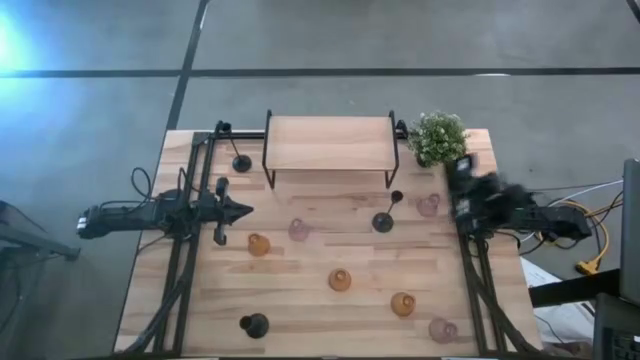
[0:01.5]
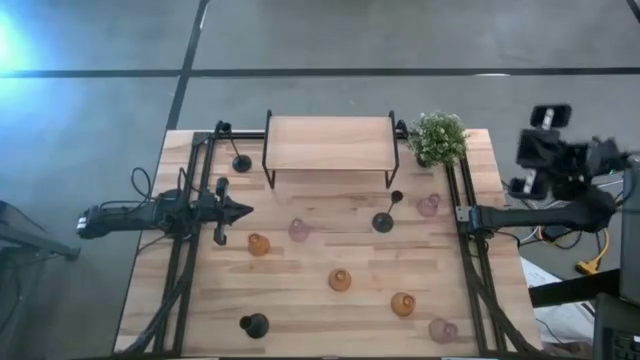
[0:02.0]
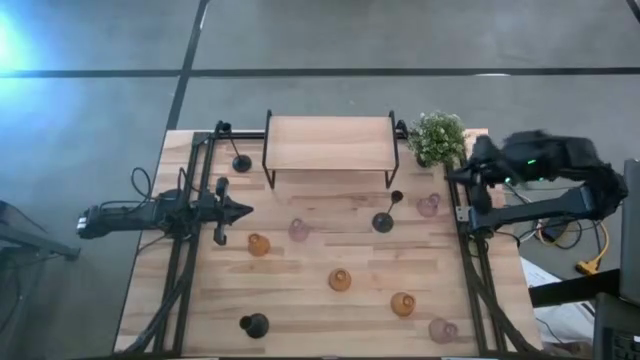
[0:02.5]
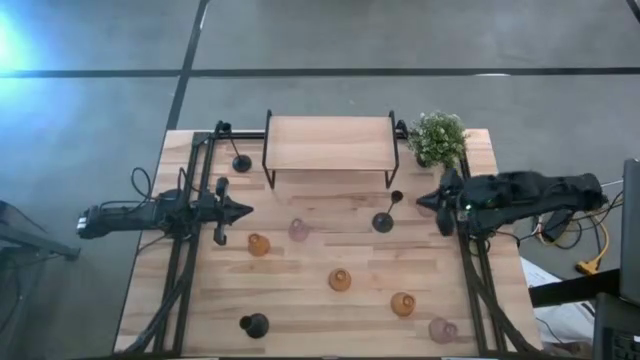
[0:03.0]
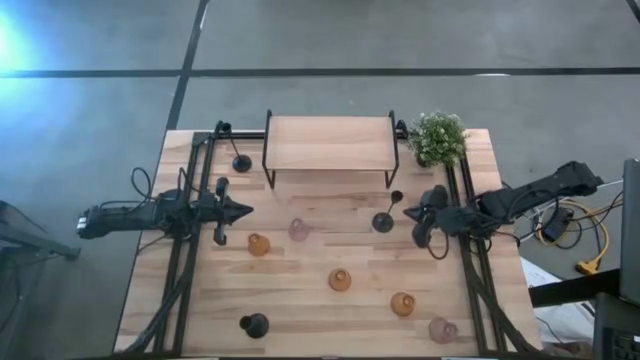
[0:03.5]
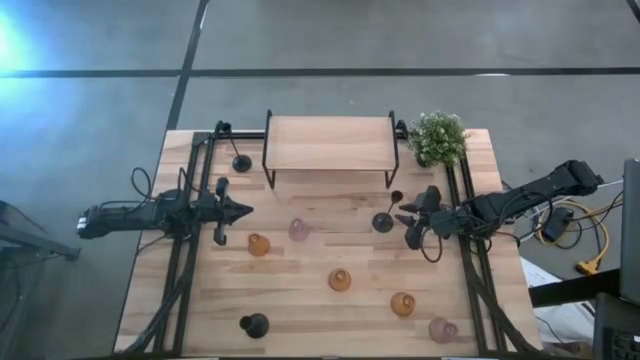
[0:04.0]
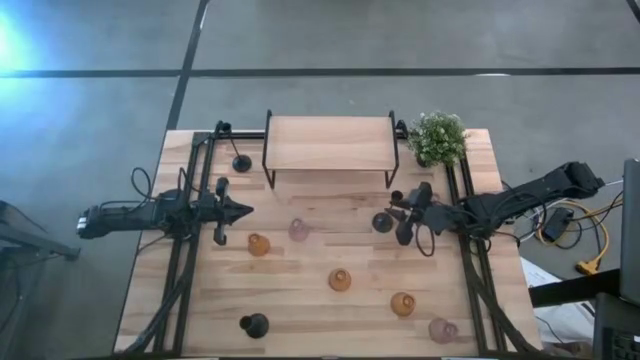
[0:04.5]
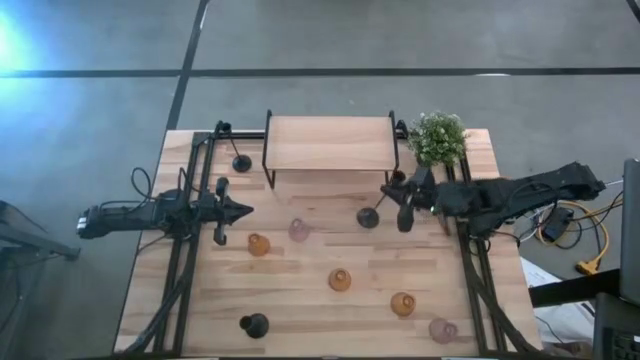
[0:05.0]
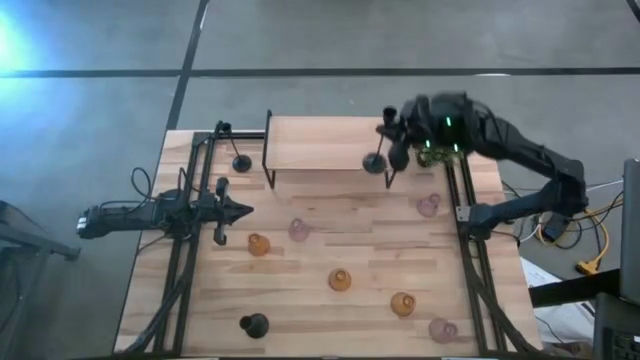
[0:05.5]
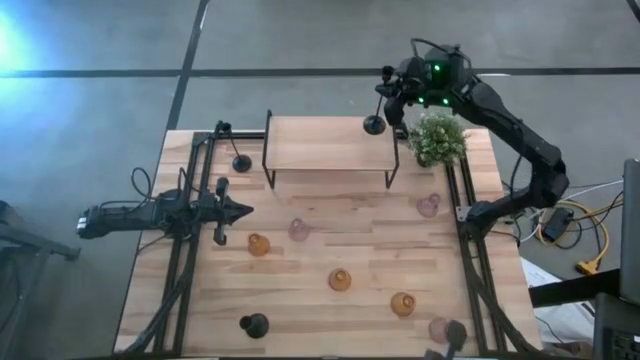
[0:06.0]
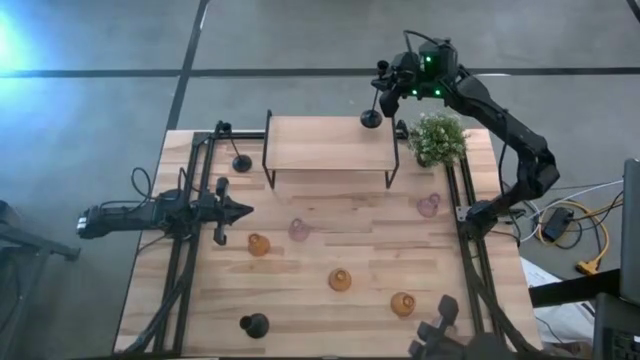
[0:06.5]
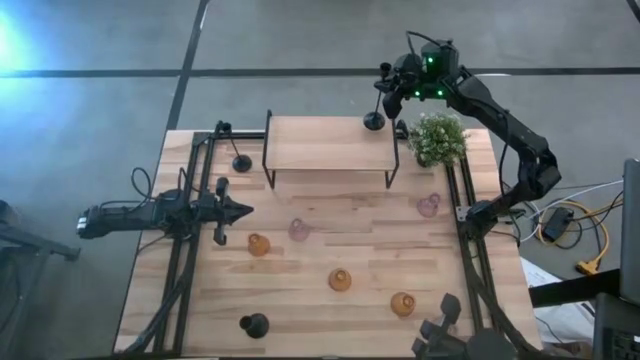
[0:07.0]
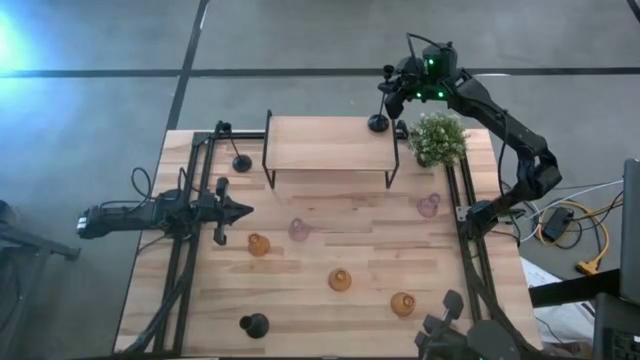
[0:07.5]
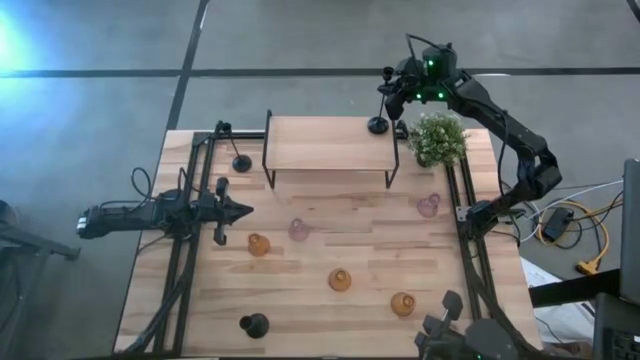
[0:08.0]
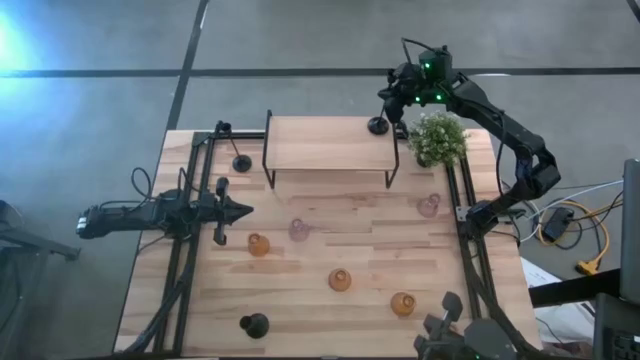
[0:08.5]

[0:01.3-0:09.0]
Task: Pick & Place candle stick holders
Put the top right black candle holder on the shelf

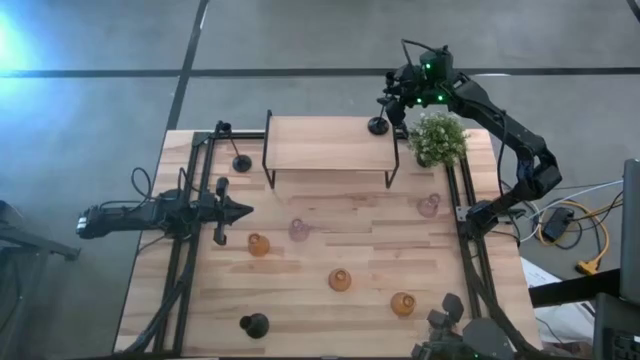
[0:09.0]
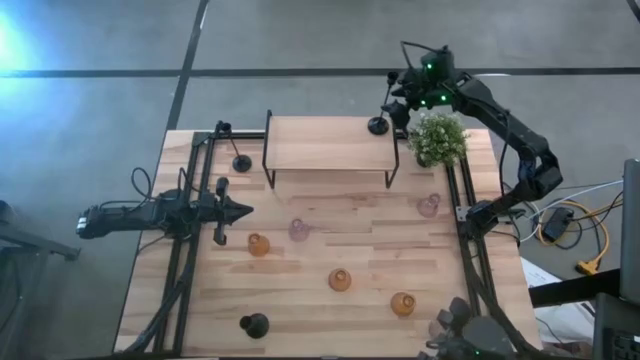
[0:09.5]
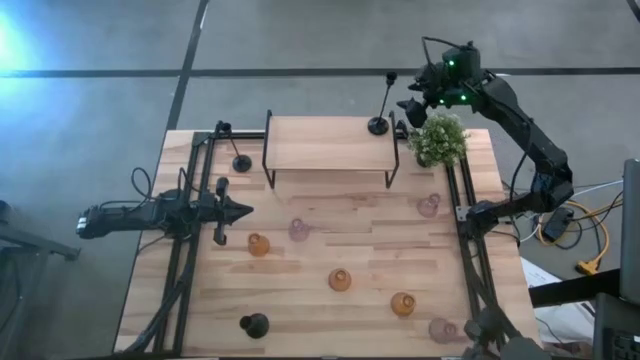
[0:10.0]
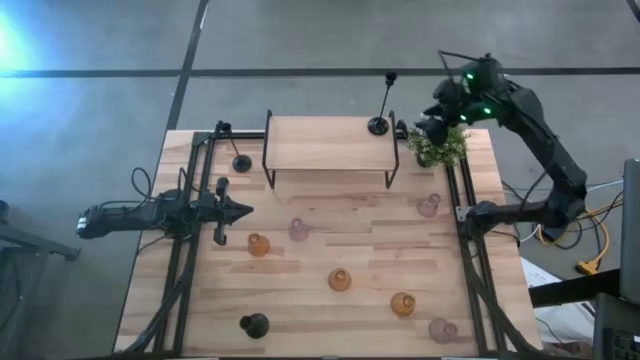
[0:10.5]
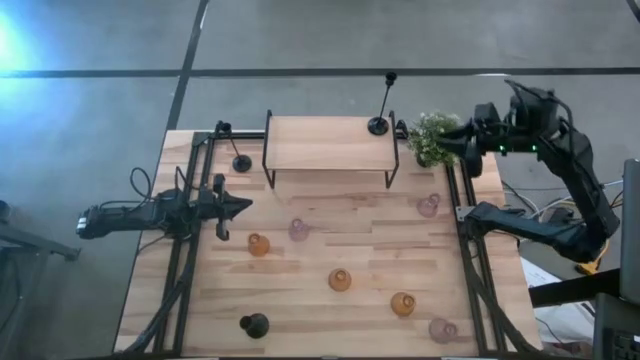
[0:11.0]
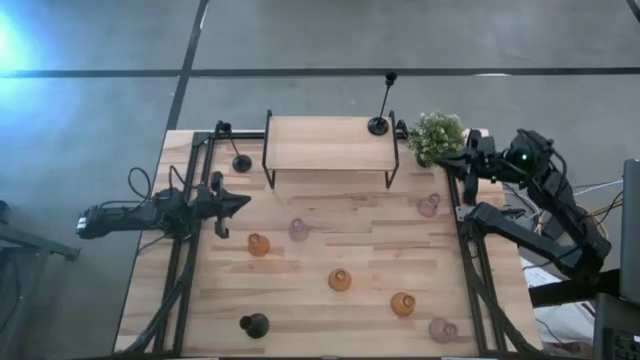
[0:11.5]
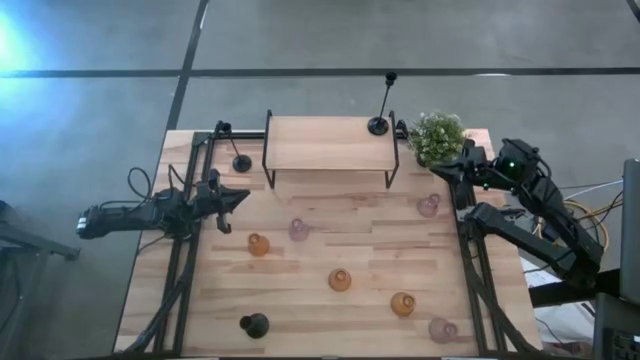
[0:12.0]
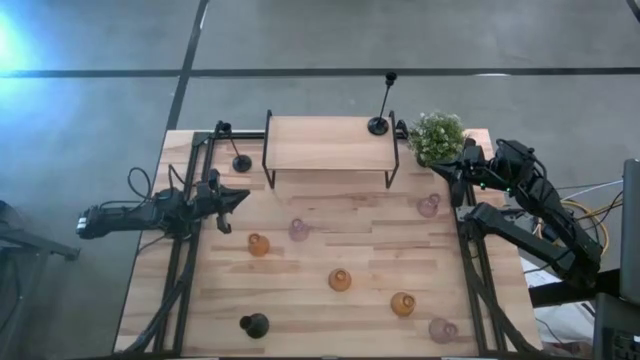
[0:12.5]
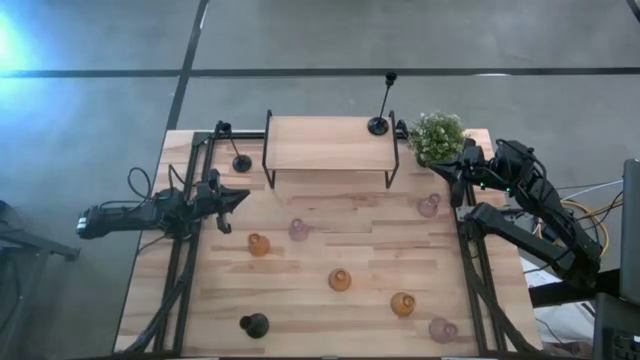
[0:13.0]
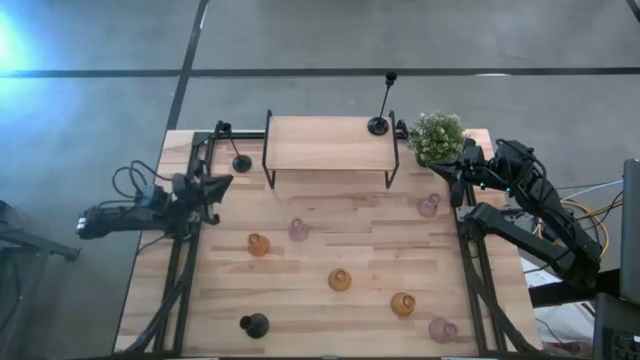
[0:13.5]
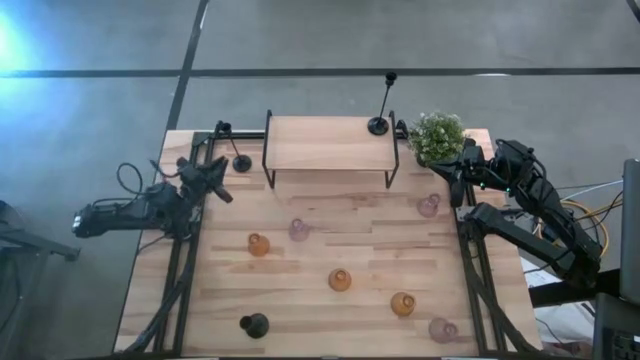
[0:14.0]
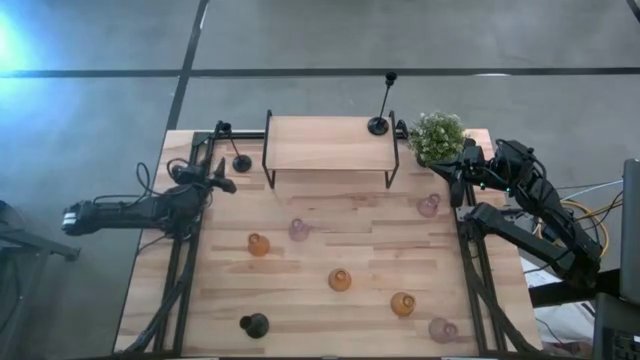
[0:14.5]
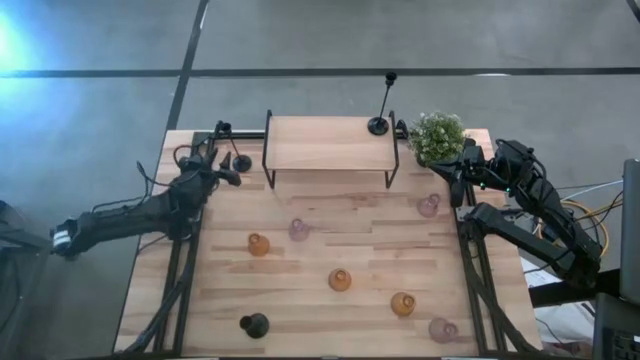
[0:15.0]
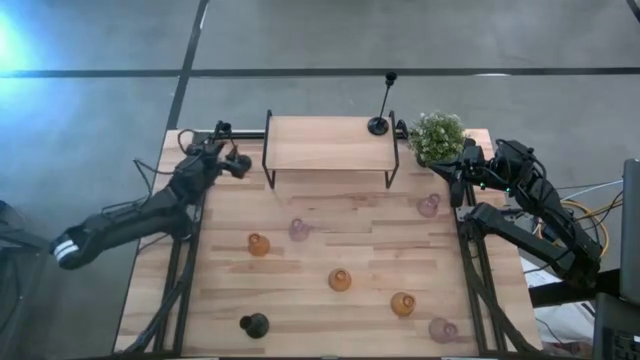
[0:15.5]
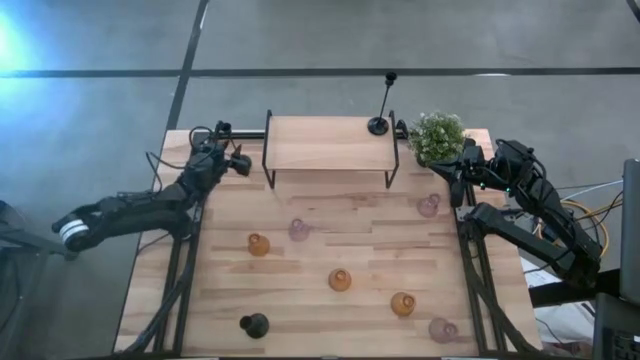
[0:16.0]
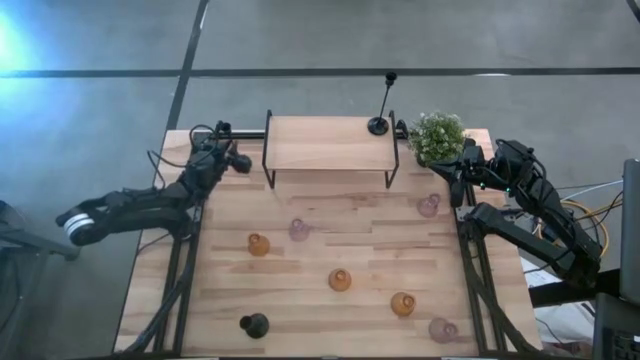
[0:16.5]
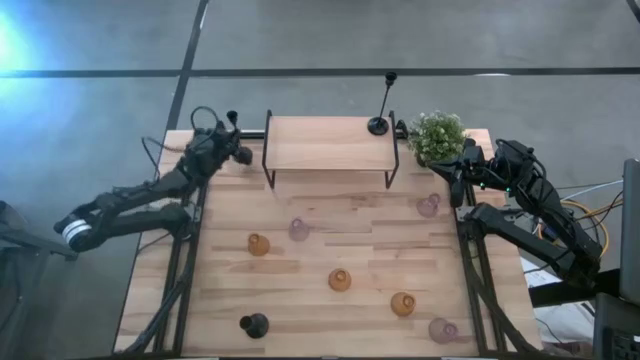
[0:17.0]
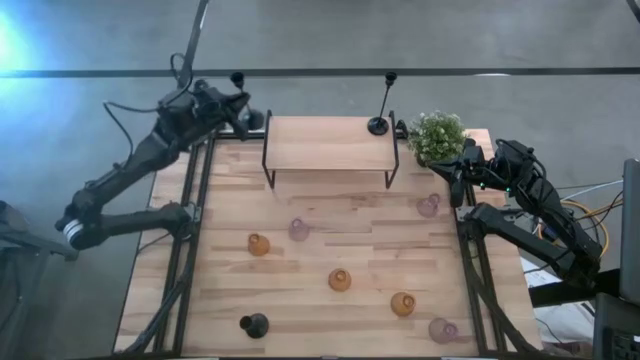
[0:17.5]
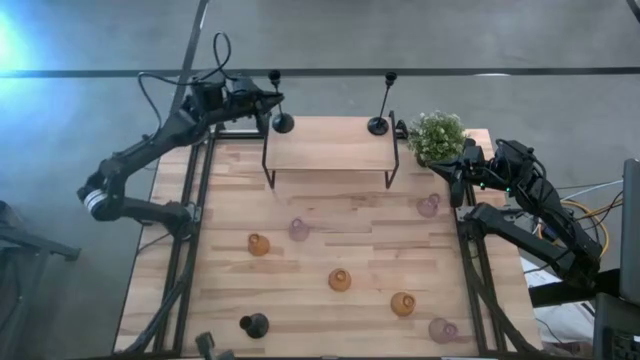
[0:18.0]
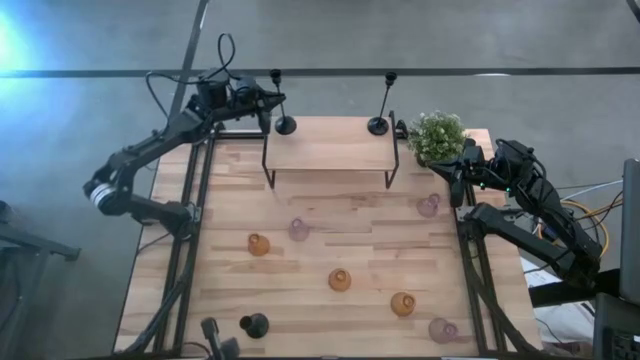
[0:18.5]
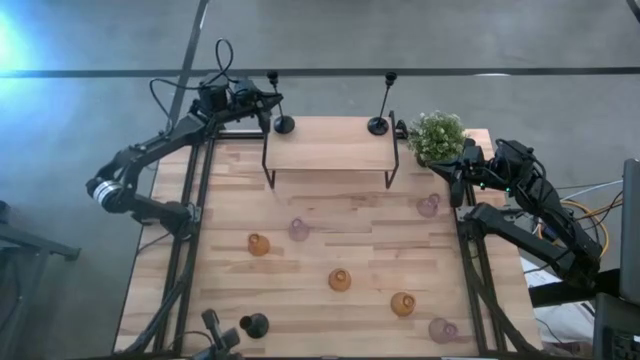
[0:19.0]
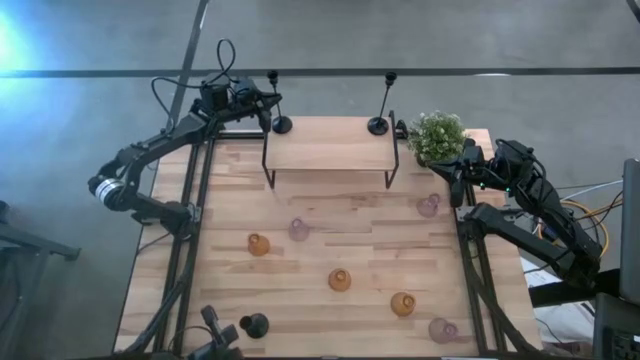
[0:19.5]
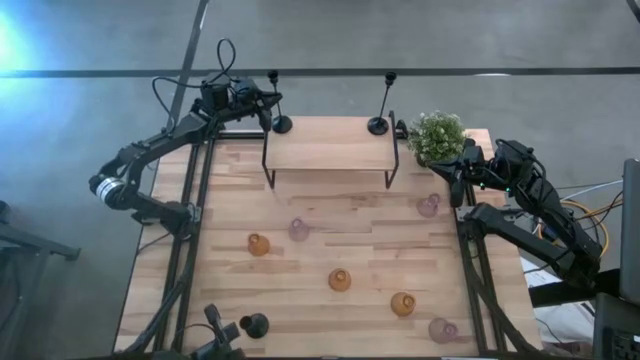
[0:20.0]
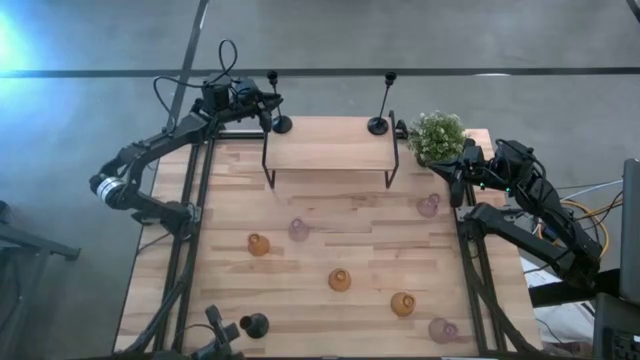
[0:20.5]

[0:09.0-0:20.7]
Put the top black candle holder on the shelf

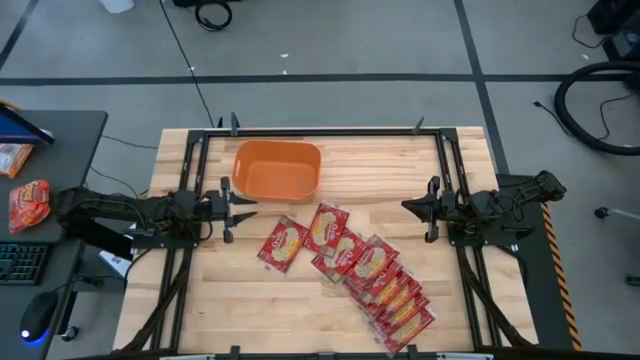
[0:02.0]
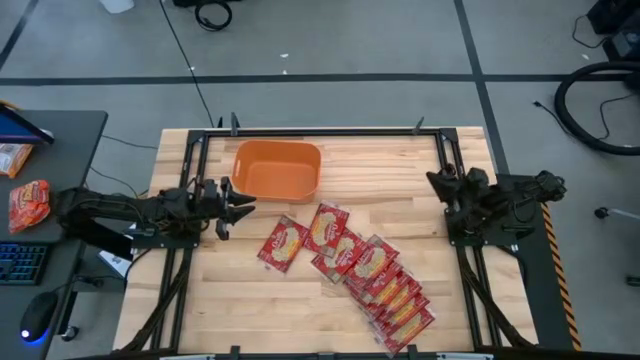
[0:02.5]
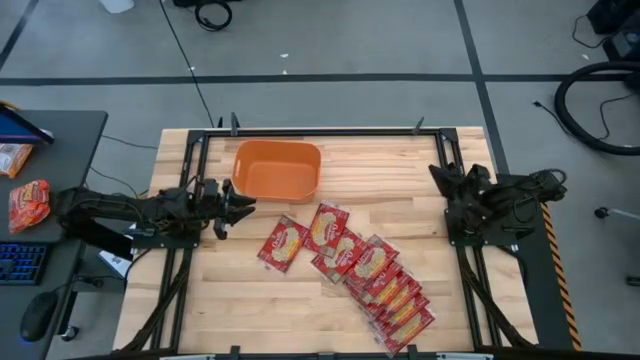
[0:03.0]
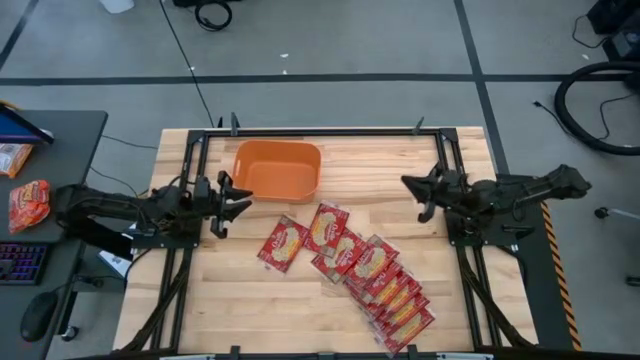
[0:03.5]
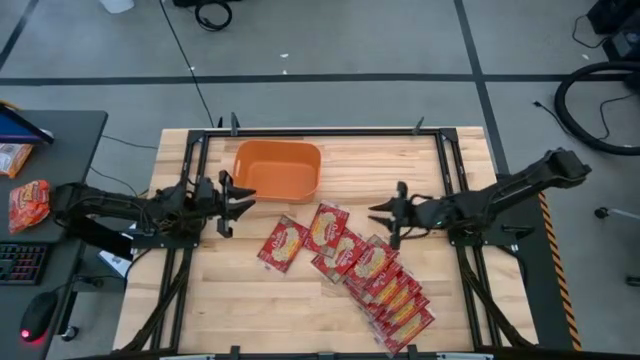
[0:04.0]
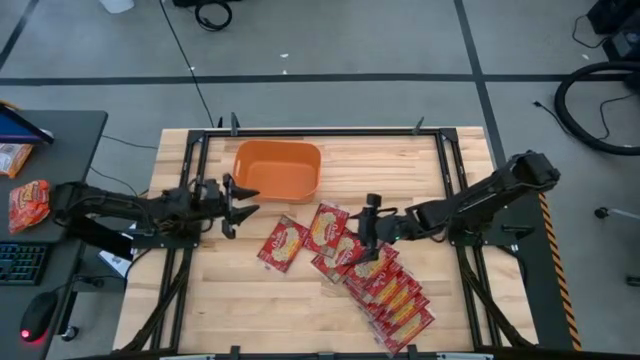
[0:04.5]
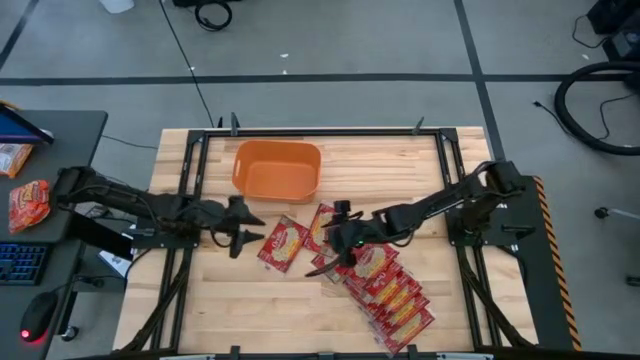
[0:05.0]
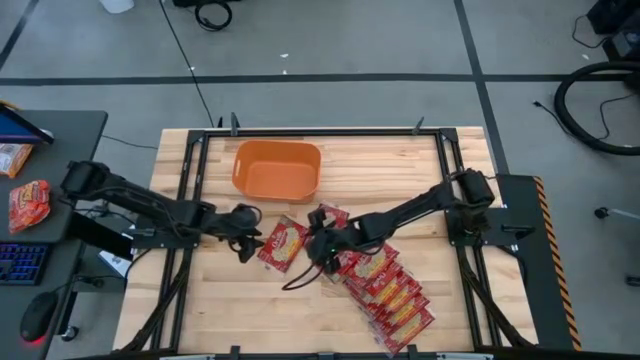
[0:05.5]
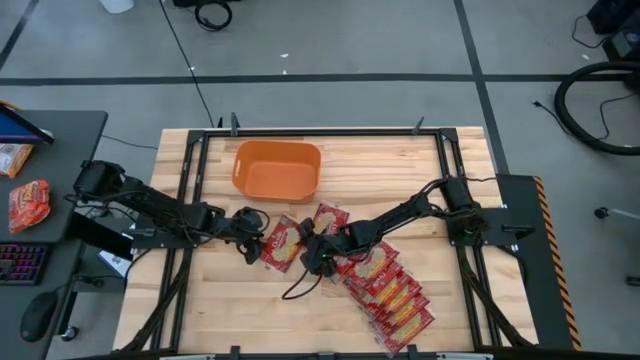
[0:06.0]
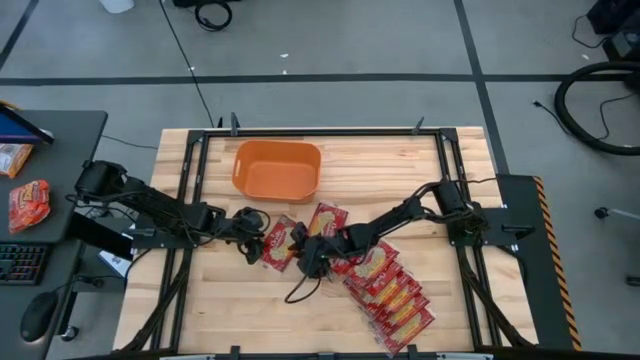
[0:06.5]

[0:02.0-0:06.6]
Task: Sort popcorn bags into baskets
Put the popcorn bag into the orange bin
